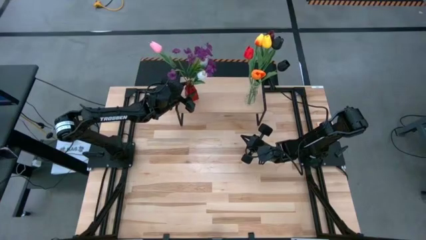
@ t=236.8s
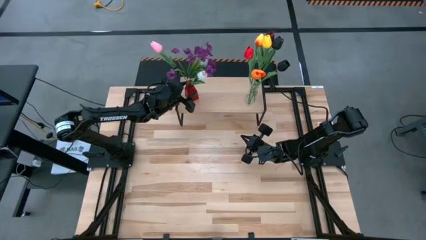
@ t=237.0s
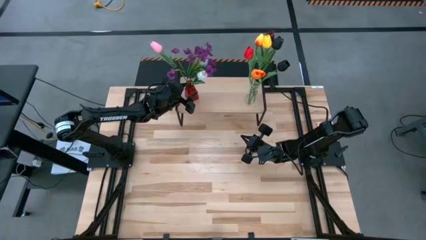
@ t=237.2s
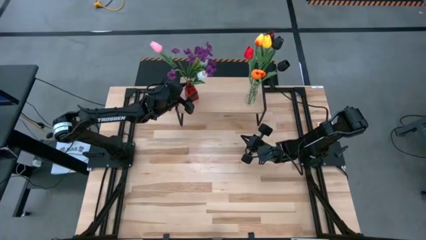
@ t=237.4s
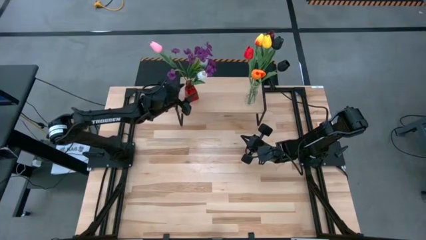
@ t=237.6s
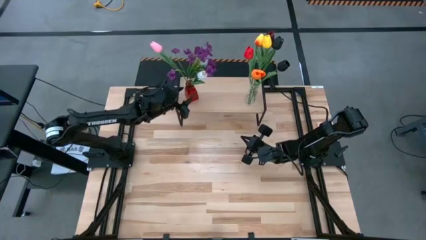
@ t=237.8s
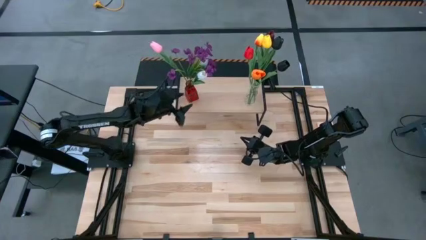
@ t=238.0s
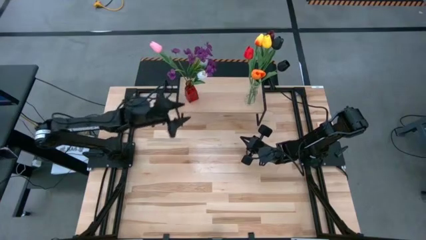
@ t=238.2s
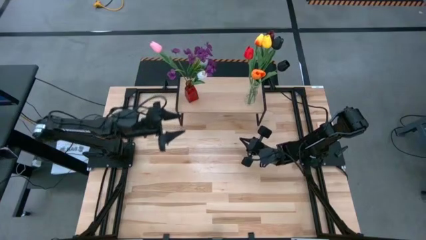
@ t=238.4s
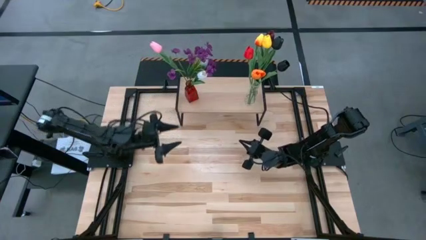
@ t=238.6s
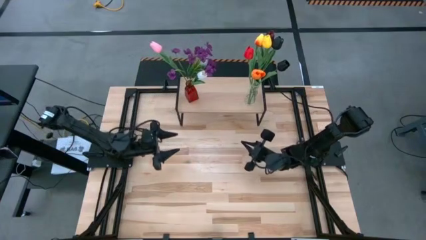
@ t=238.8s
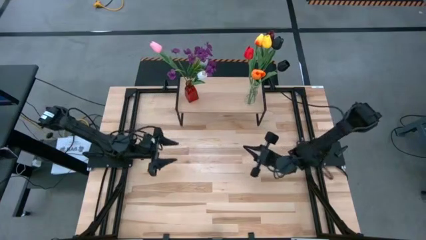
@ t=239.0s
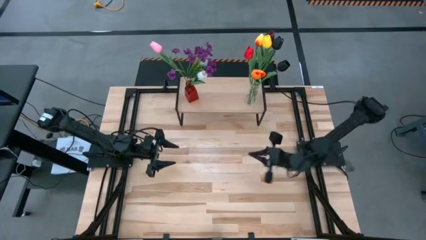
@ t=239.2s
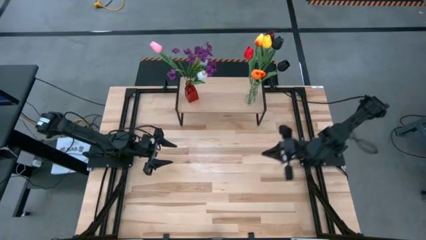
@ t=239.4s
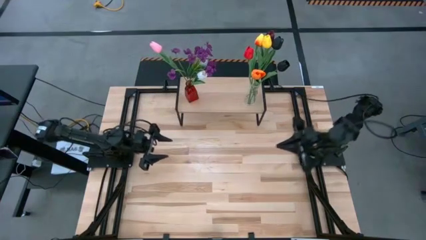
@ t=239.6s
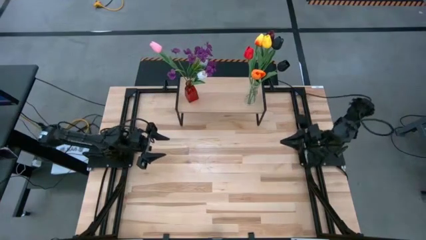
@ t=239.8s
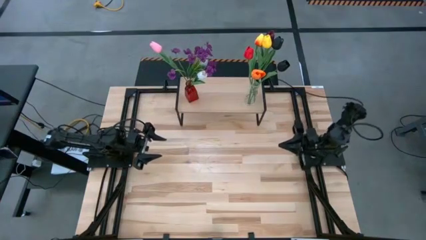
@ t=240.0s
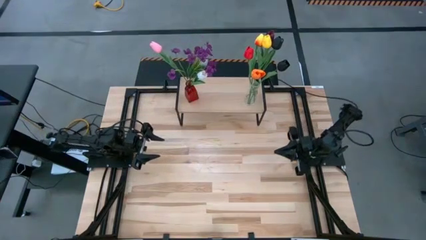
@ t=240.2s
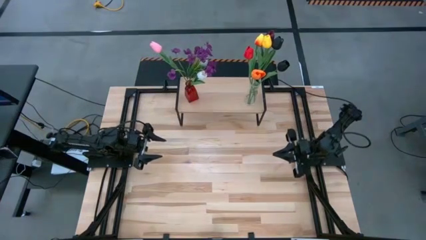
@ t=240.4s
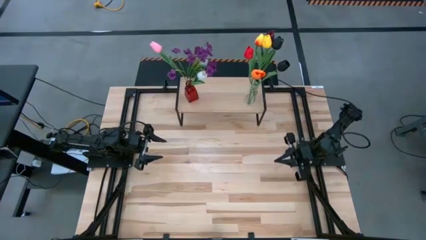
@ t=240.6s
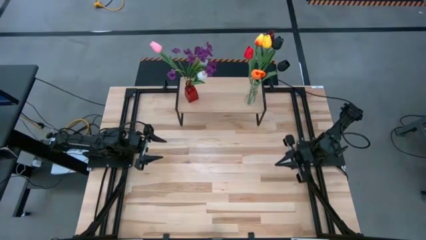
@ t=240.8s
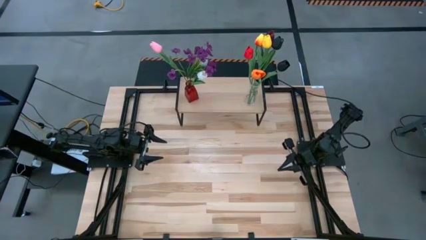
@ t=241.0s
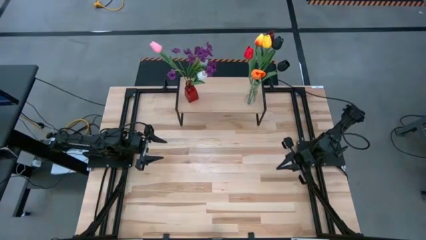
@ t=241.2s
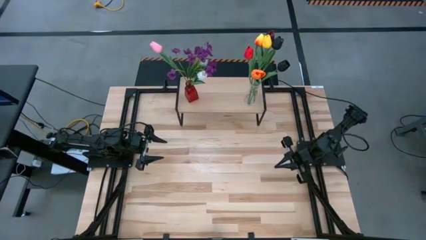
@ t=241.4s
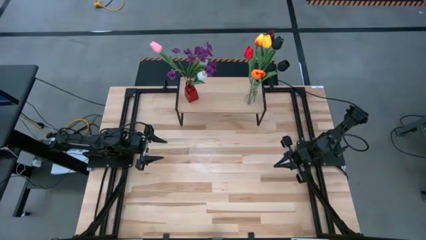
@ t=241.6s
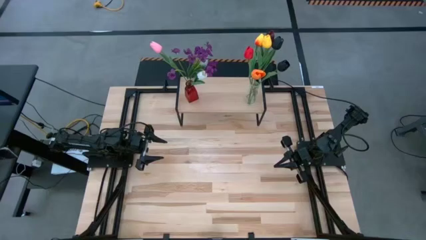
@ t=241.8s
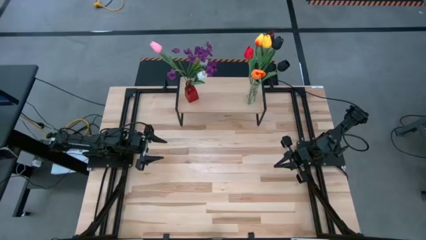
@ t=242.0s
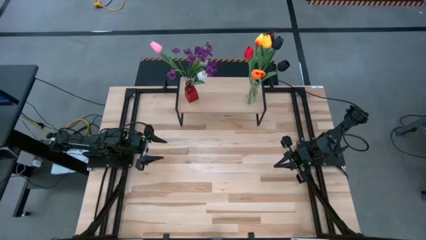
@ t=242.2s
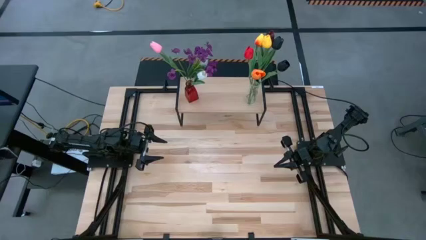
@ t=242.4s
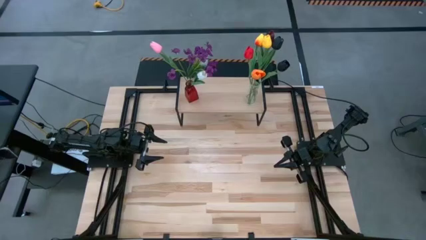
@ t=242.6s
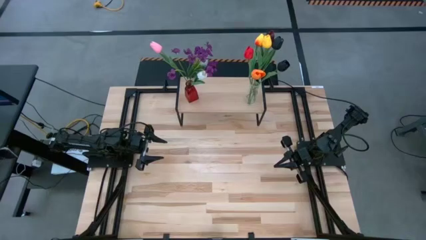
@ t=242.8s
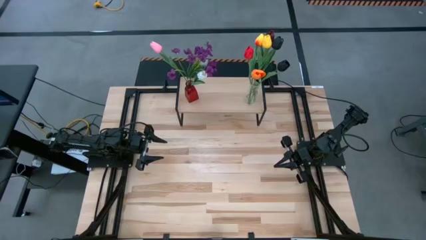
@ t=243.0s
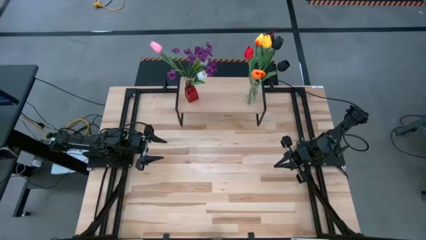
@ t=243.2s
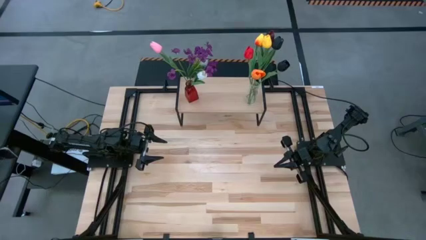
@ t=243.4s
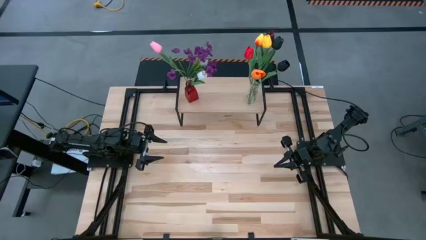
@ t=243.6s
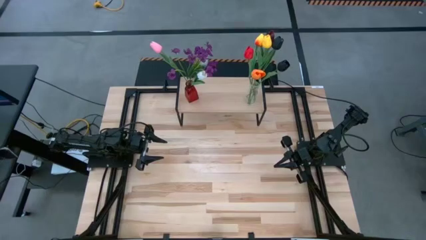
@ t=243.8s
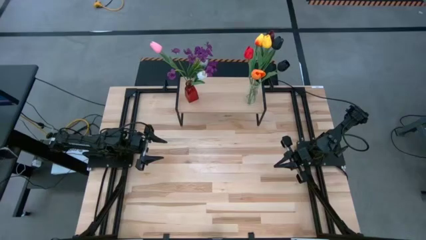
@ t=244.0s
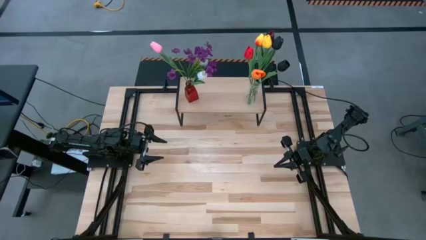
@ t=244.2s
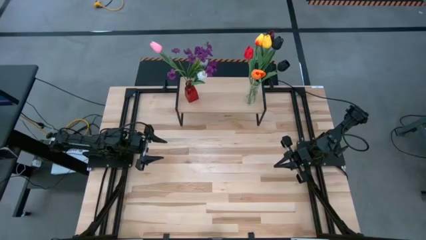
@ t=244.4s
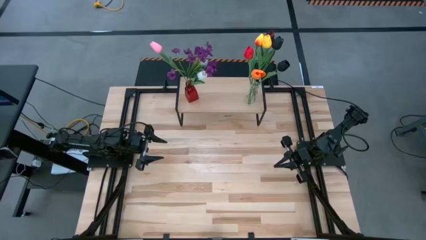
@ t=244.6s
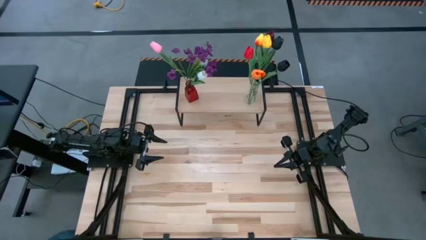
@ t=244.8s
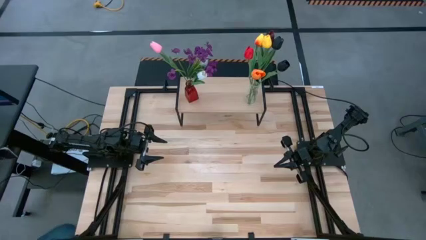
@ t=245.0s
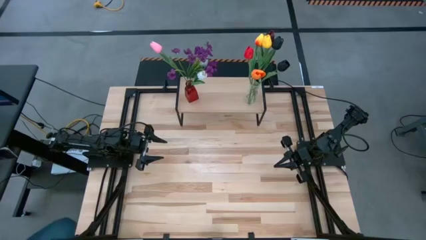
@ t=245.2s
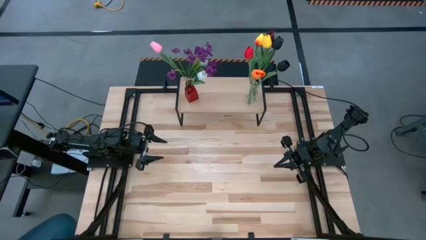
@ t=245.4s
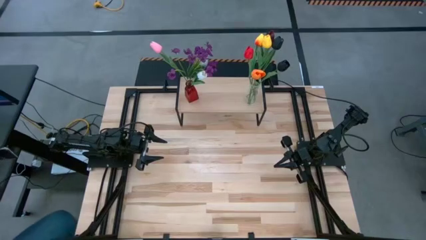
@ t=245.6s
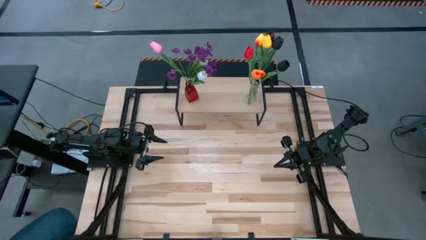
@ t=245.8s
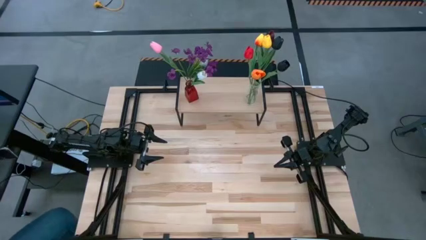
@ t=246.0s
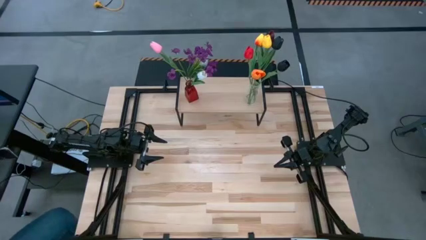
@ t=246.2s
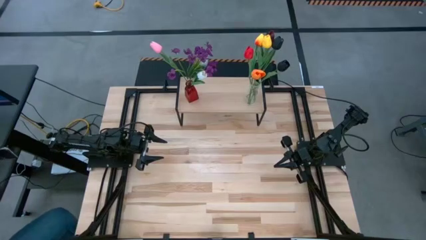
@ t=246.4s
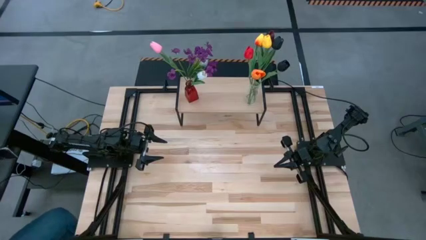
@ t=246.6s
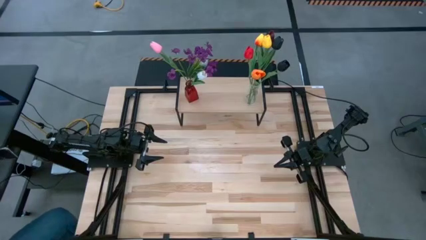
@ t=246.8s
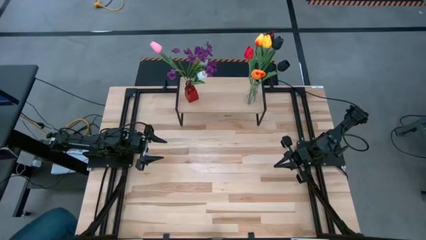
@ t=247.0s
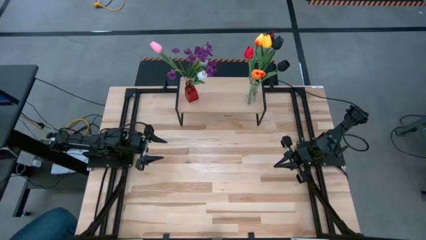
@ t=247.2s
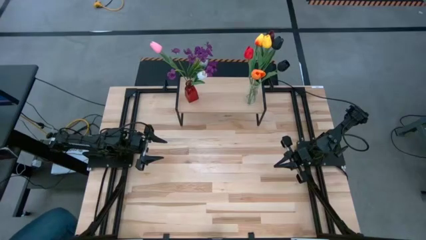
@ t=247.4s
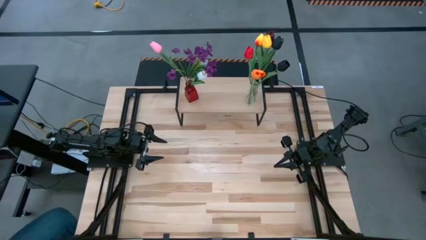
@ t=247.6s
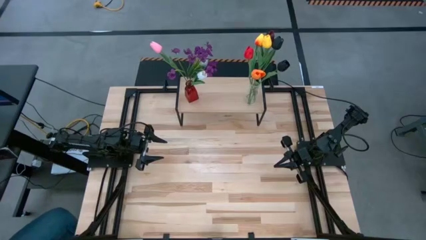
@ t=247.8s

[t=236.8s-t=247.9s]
Task: Pick and place flowers into a vace then onto a shelf
Return to Home Position
